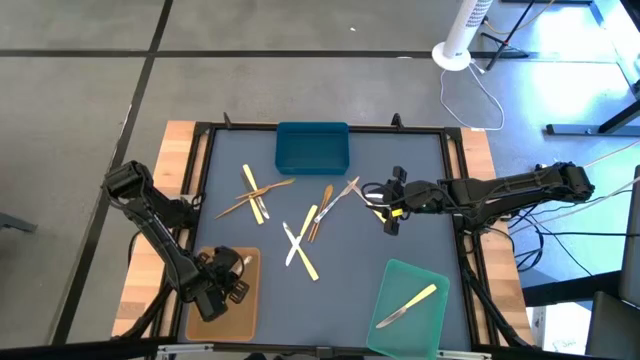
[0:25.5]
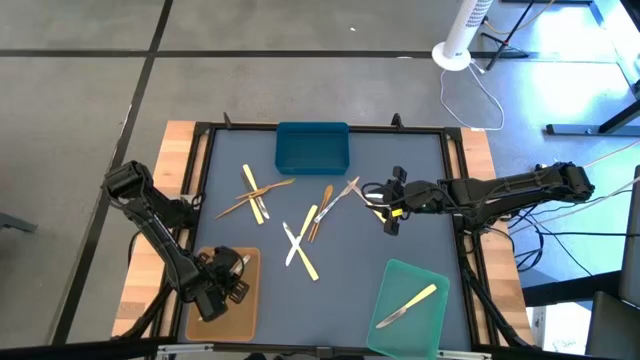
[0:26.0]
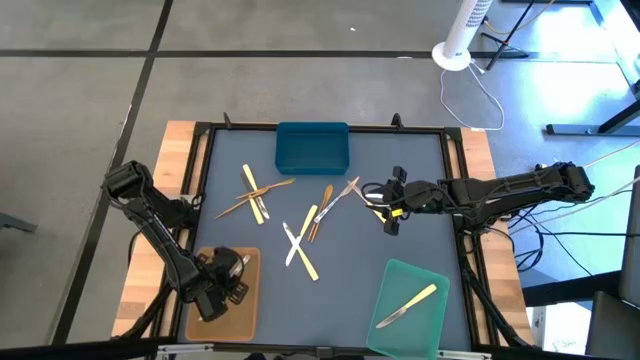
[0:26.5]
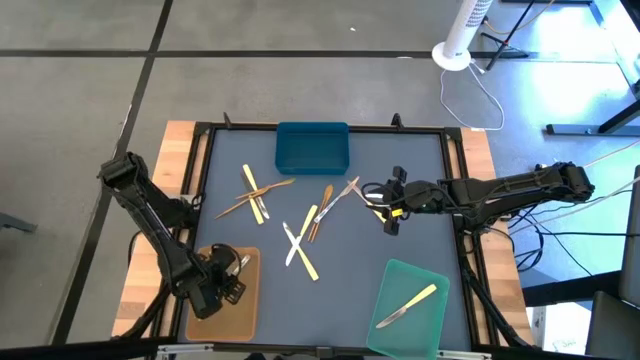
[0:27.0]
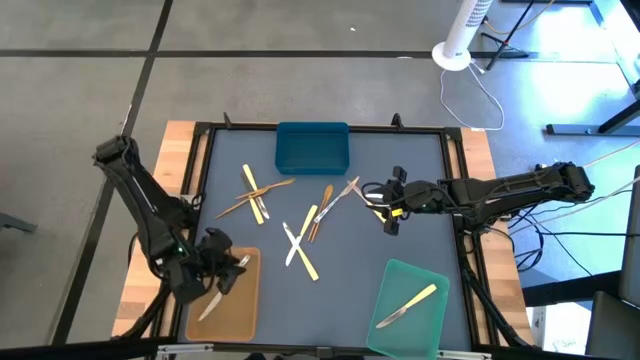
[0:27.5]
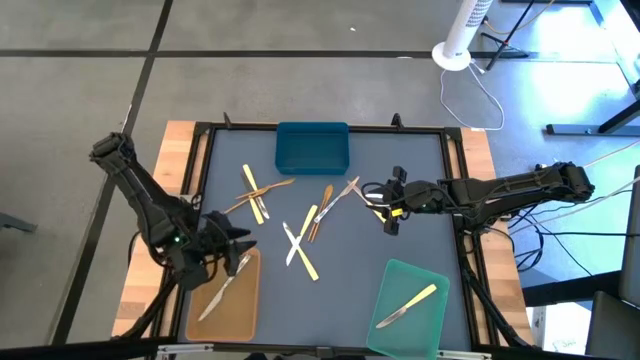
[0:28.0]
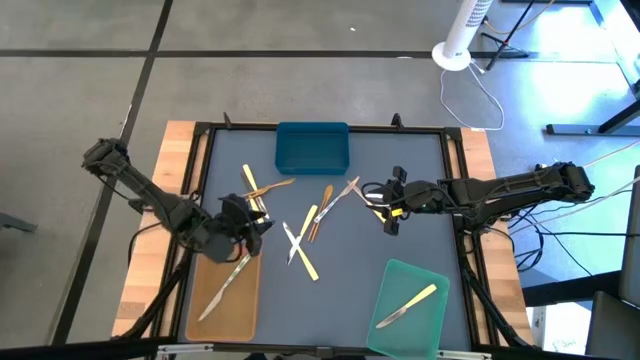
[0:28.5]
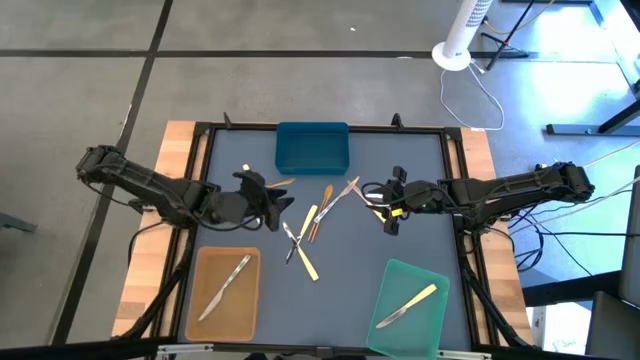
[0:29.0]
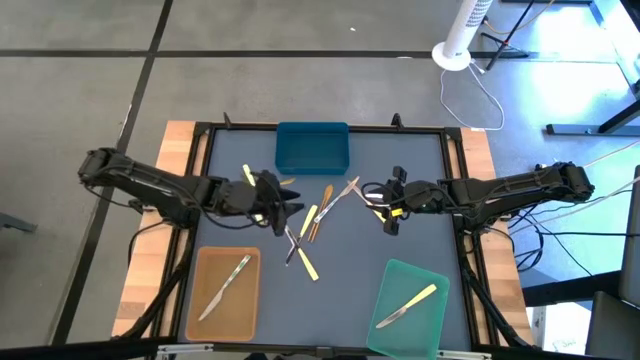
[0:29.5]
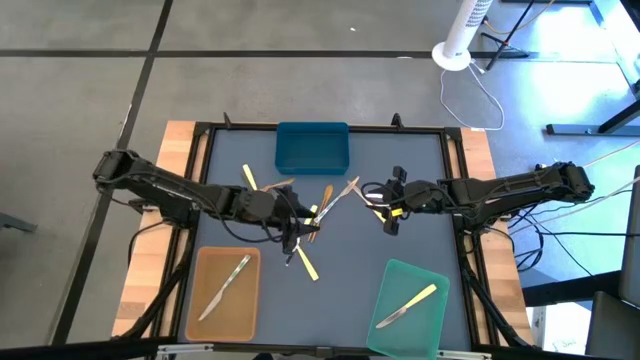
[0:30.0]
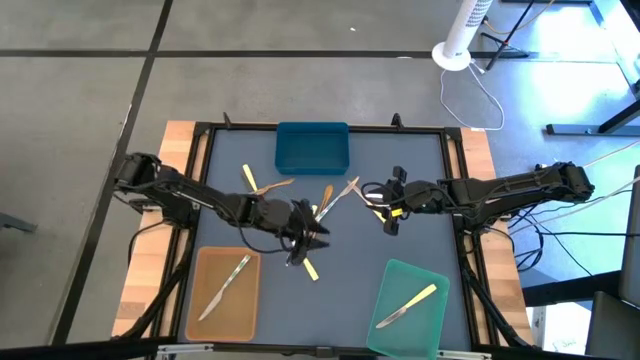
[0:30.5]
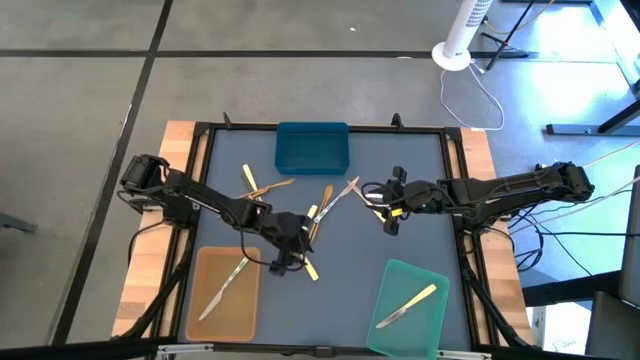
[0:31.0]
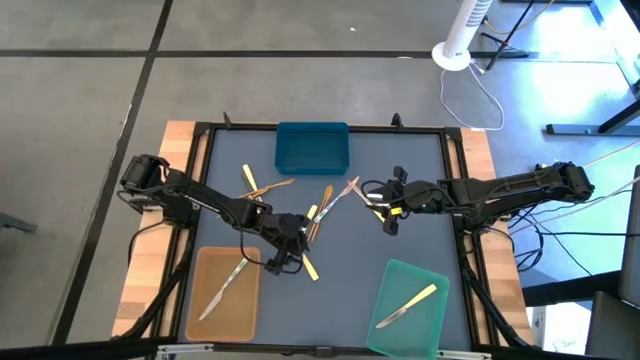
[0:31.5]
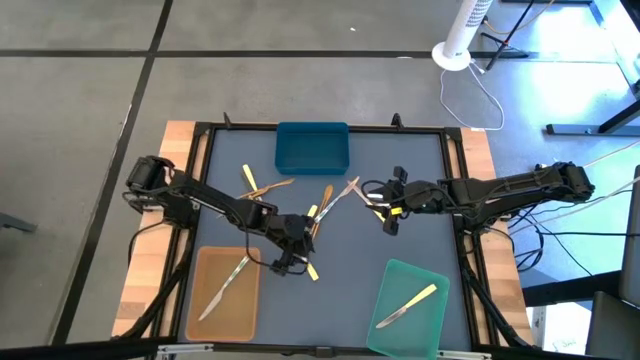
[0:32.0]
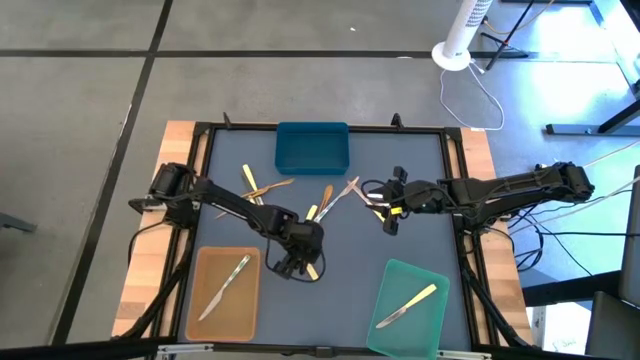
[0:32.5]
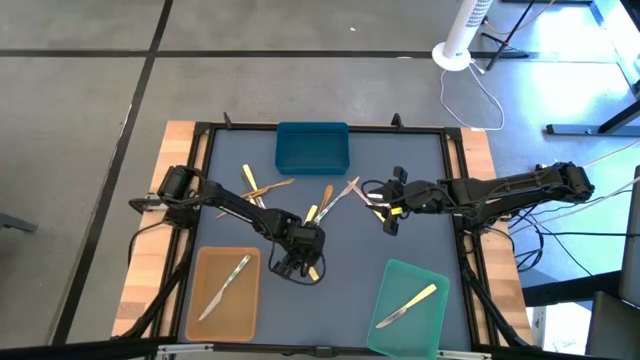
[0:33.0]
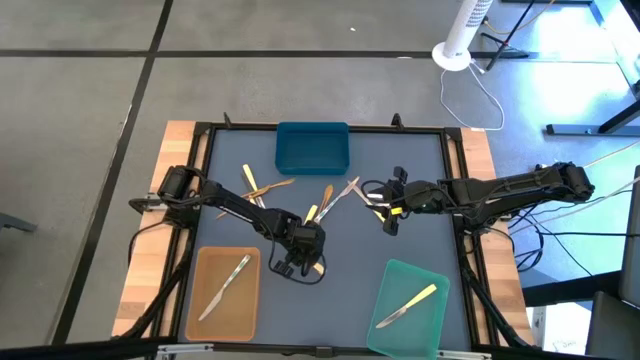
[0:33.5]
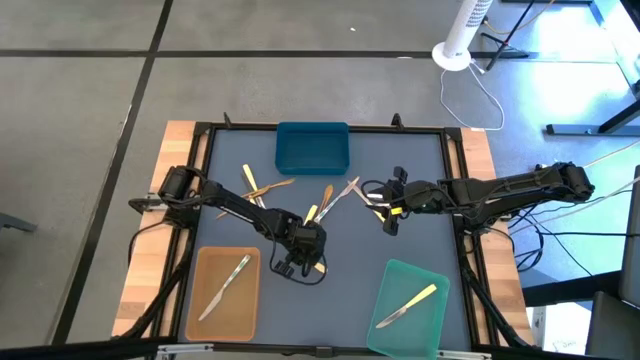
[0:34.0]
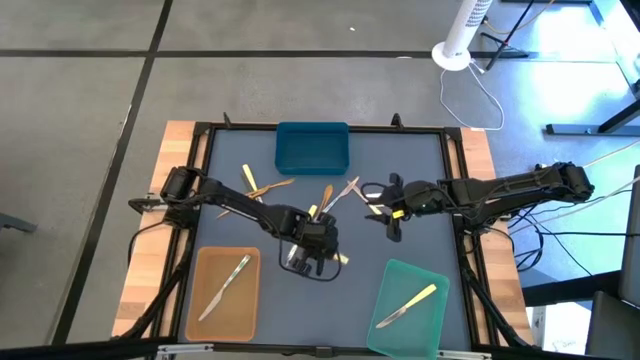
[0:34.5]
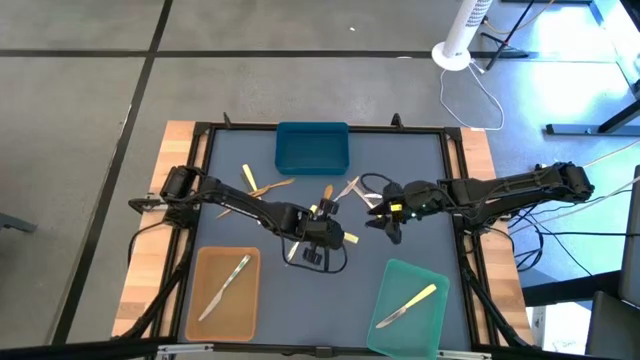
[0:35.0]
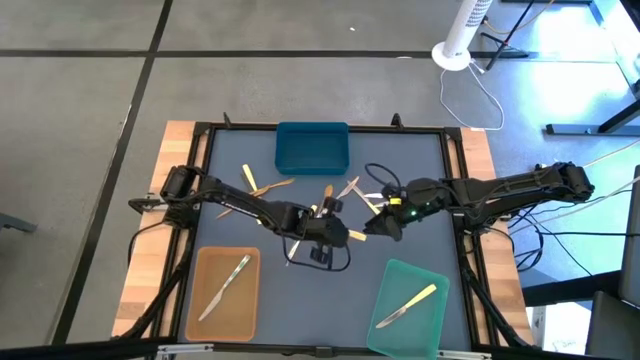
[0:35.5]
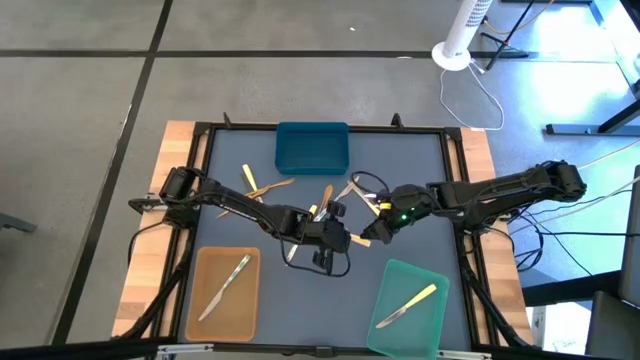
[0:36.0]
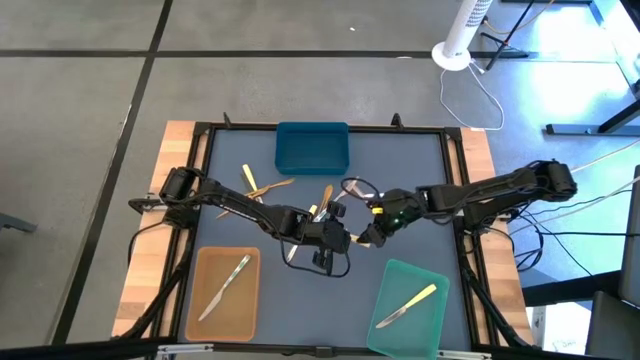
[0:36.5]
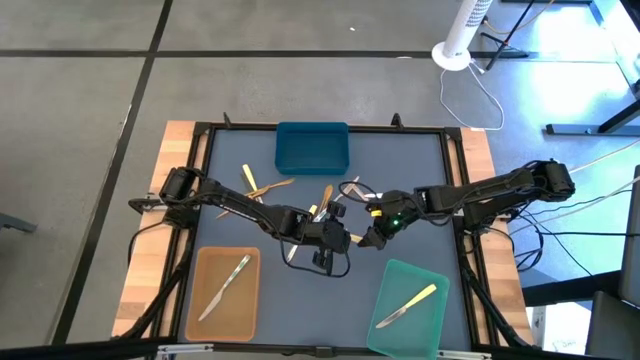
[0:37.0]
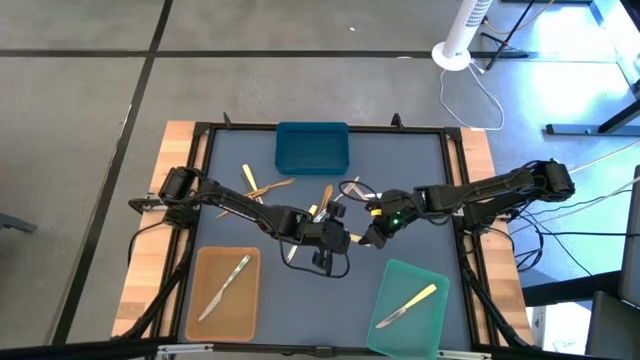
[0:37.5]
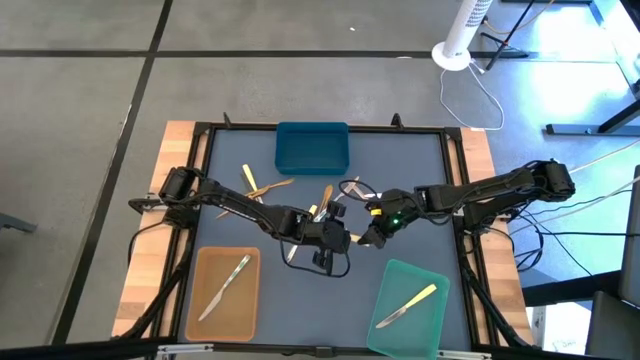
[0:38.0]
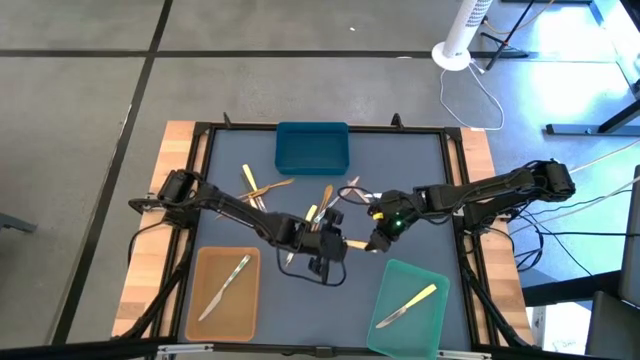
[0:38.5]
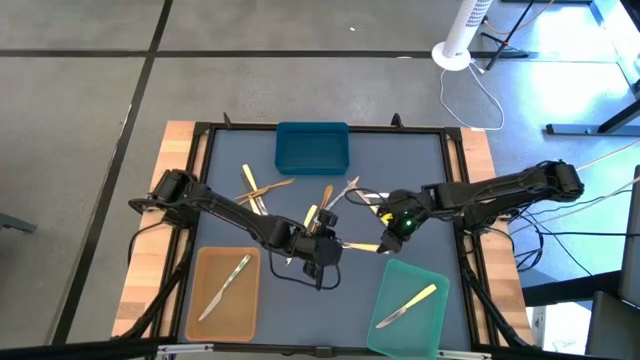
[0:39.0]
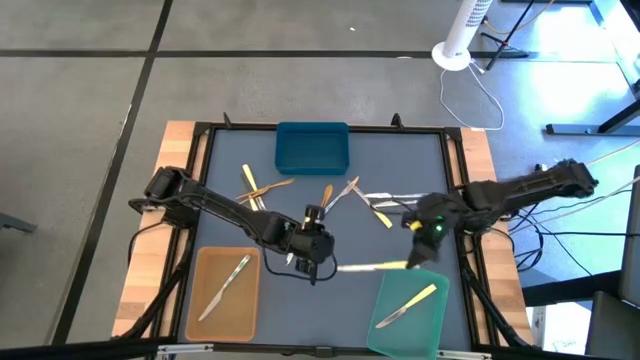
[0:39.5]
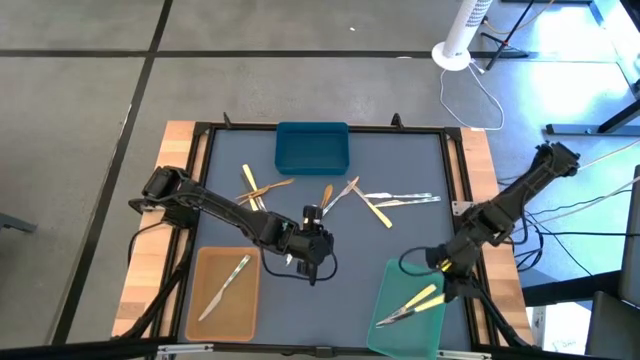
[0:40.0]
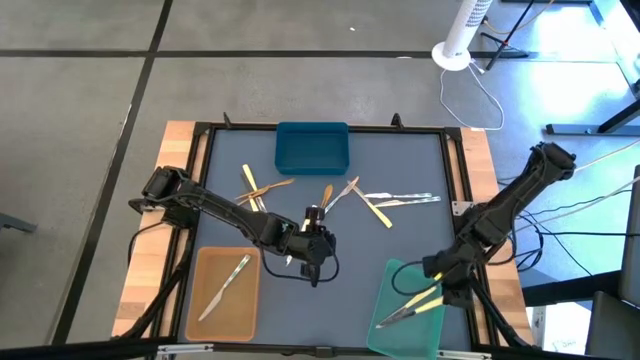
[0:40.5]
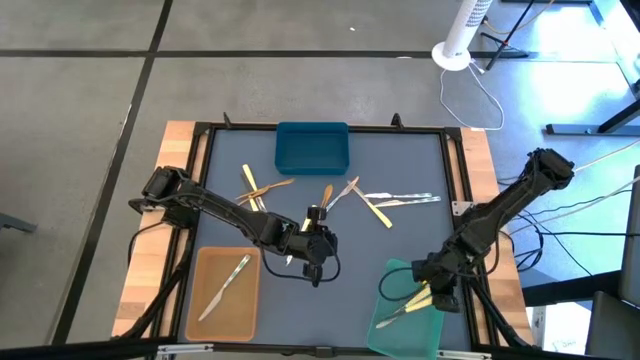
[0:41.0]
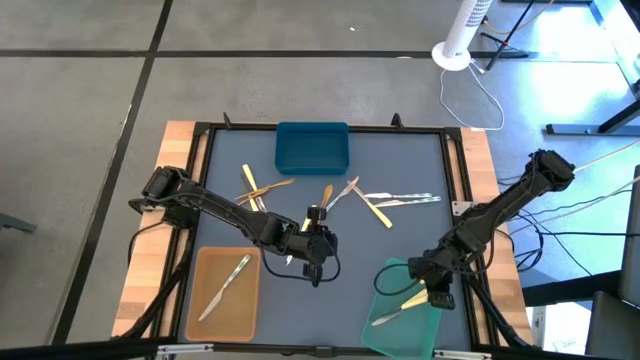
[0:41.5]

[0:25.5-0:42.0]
Task: Sort silverware by color (type)
Put the yellow knife into the green bin

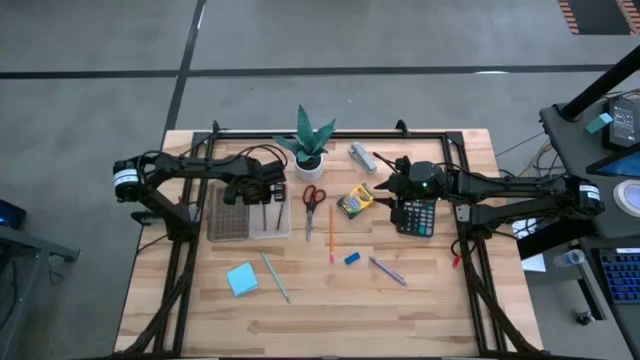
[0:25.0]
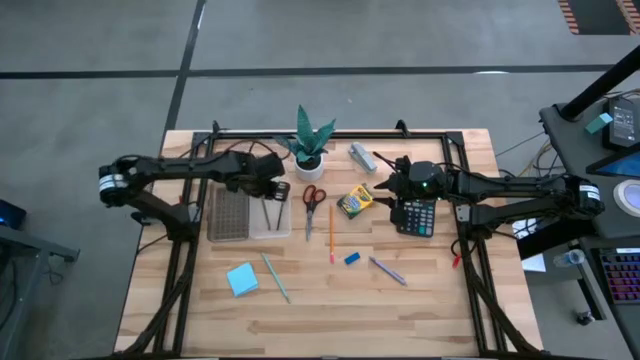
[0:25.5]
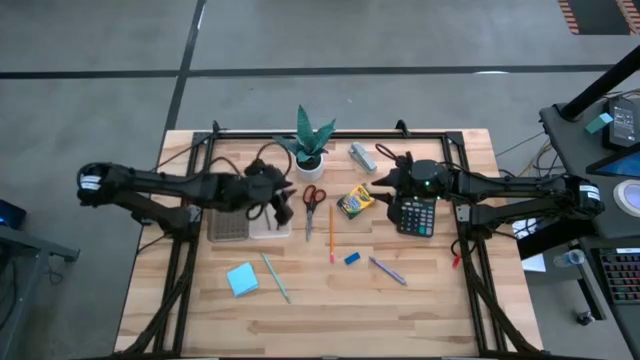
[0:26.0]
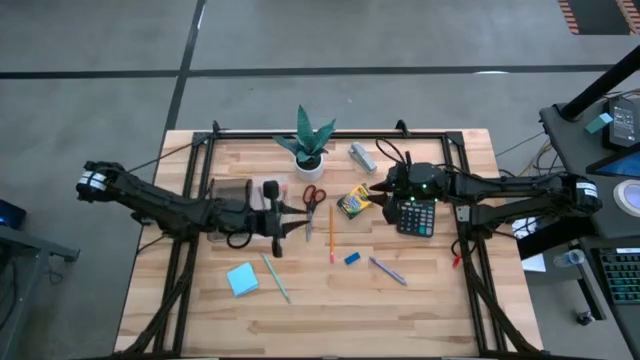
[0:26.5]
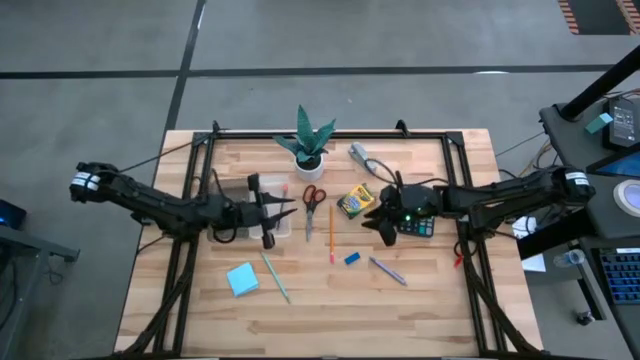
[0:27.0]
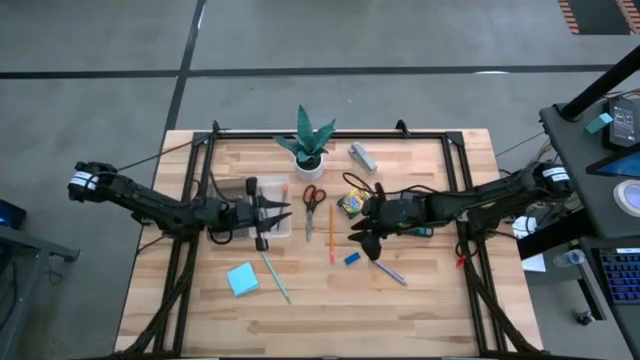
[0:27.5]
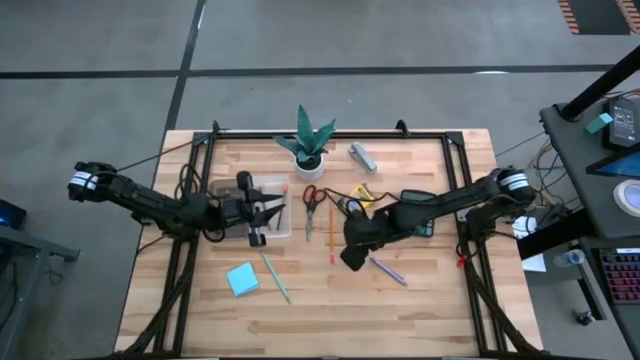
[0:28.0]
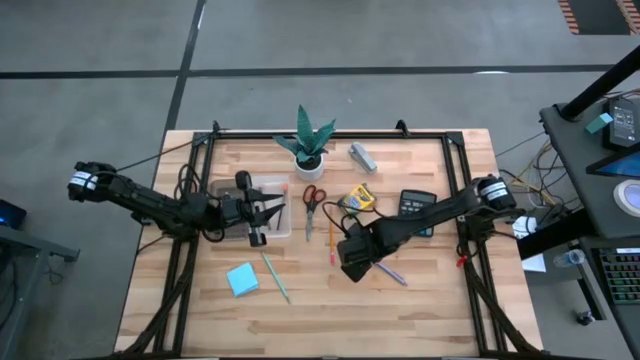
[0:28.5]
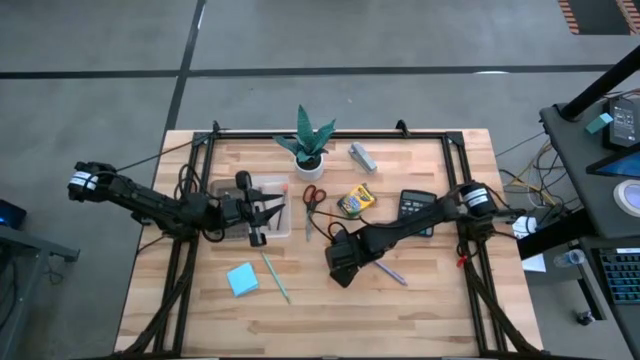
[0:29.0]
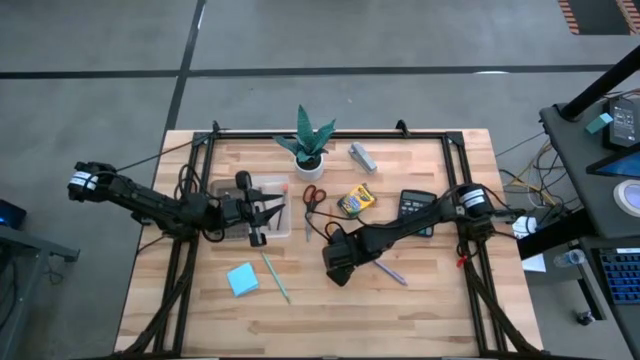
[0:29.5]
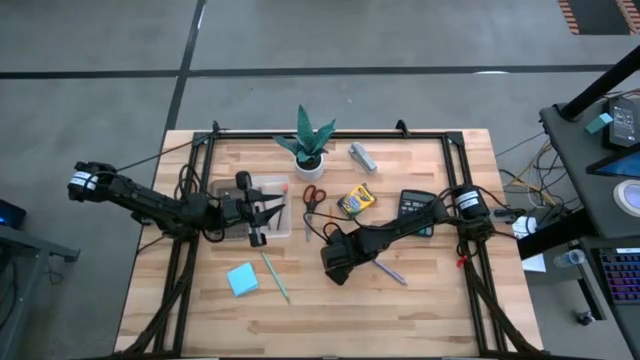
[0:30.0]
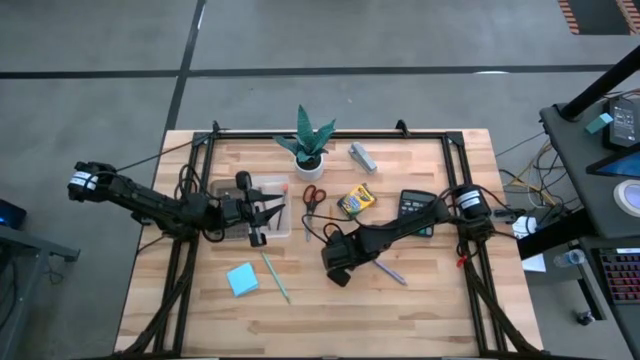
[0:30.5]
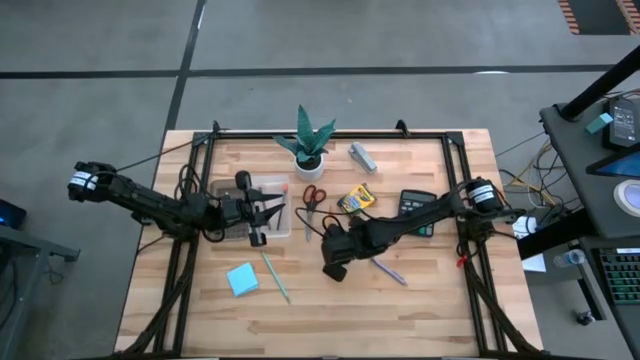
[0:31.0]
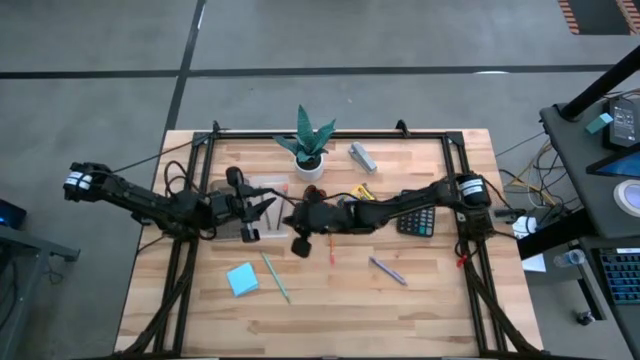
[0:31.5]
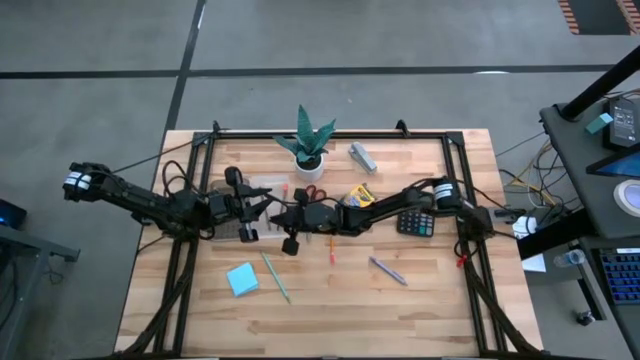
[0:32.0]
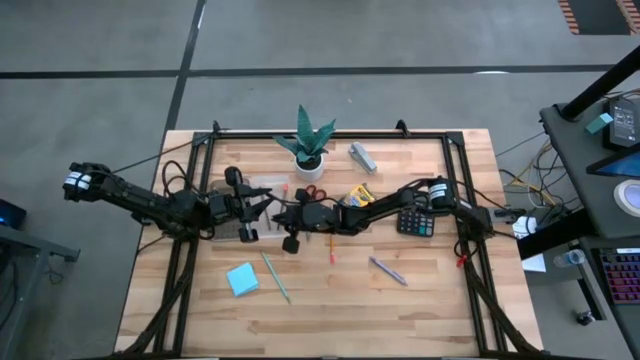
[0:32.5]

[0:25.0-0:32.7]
Task: Pack school essentials
Put the blue eraser into the white and black box
